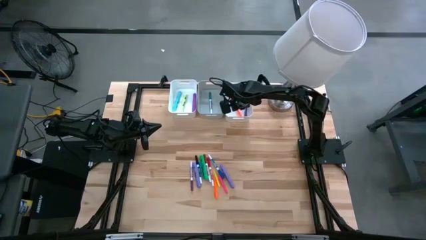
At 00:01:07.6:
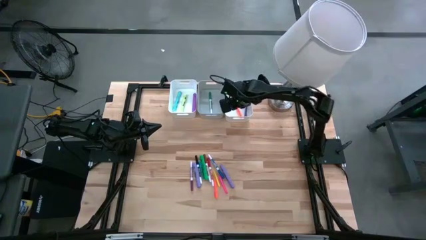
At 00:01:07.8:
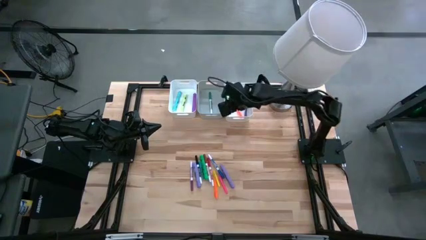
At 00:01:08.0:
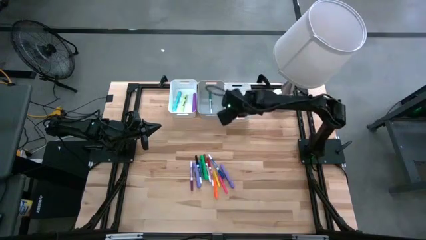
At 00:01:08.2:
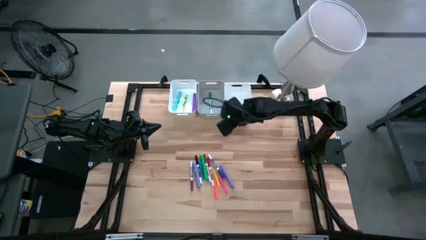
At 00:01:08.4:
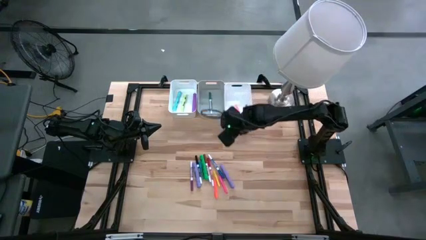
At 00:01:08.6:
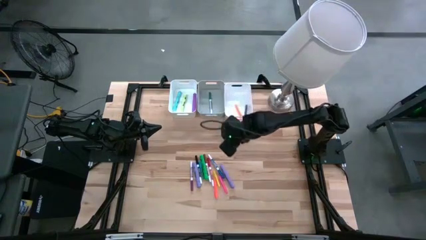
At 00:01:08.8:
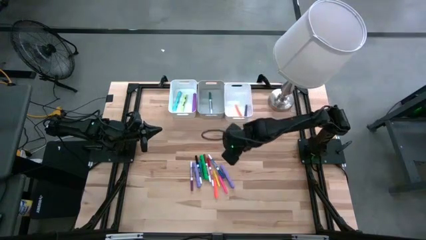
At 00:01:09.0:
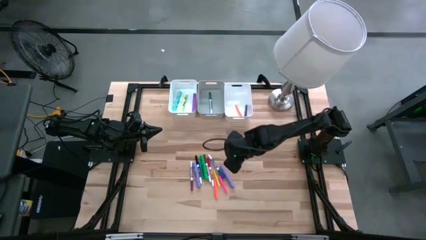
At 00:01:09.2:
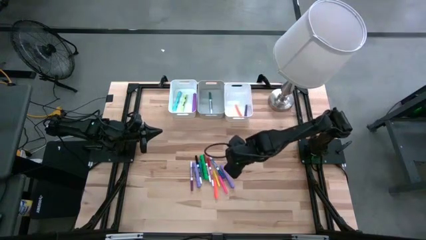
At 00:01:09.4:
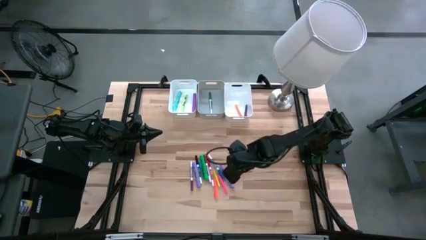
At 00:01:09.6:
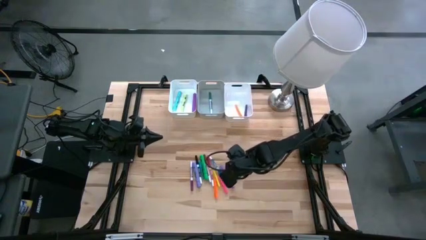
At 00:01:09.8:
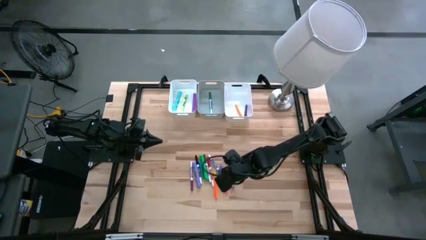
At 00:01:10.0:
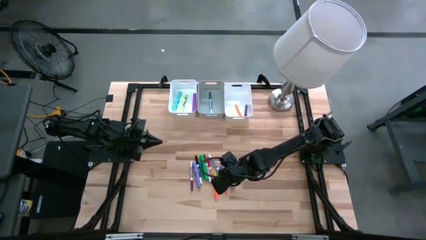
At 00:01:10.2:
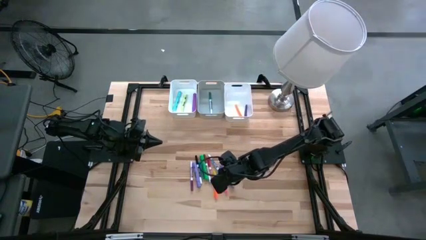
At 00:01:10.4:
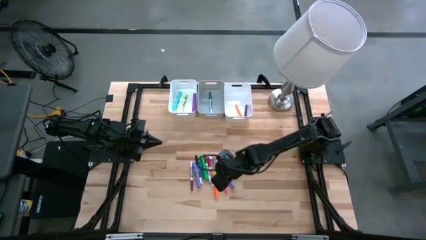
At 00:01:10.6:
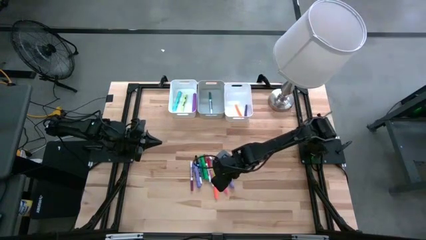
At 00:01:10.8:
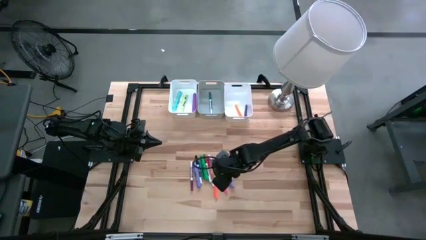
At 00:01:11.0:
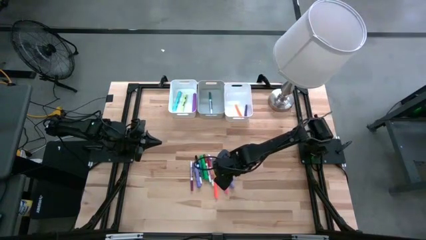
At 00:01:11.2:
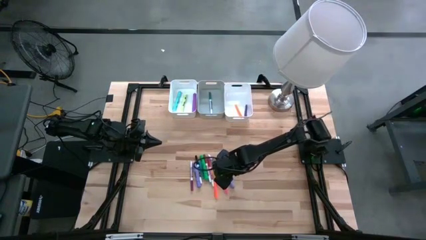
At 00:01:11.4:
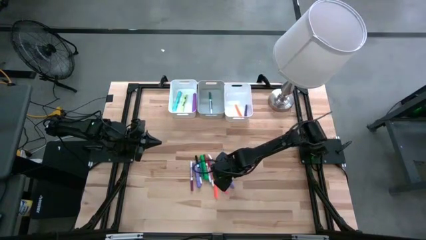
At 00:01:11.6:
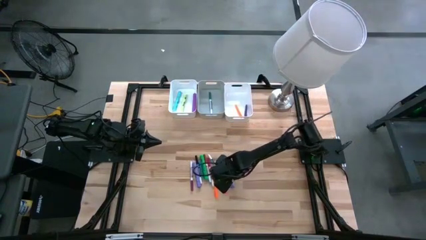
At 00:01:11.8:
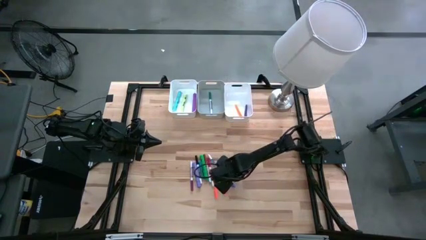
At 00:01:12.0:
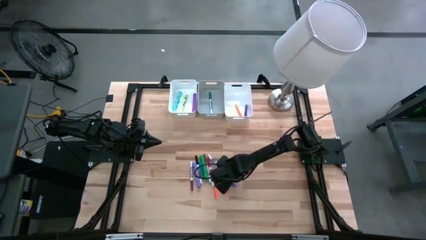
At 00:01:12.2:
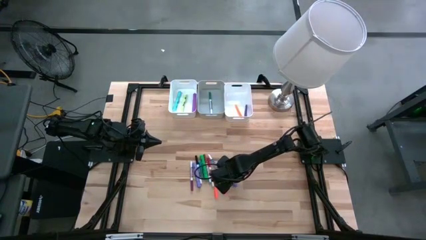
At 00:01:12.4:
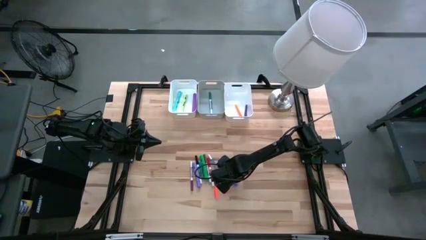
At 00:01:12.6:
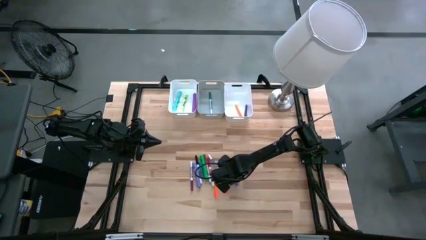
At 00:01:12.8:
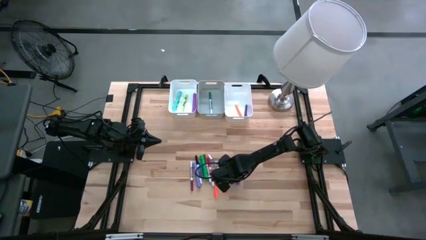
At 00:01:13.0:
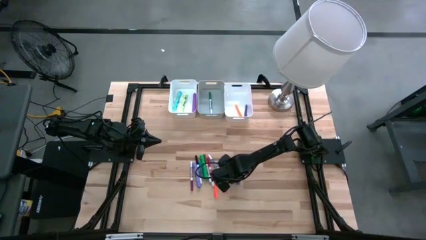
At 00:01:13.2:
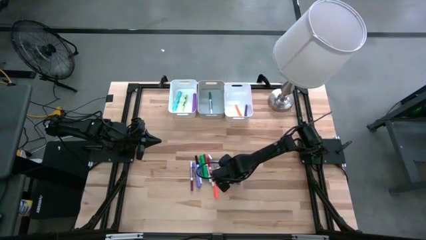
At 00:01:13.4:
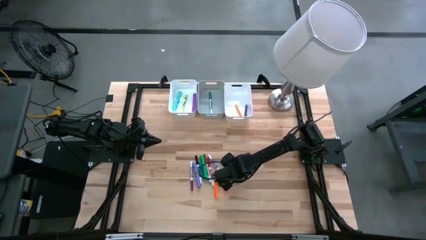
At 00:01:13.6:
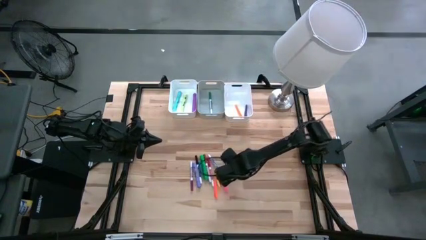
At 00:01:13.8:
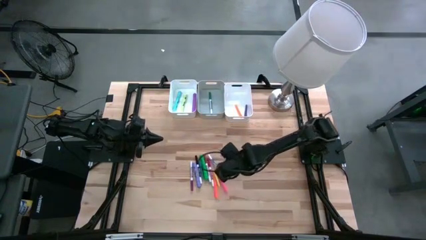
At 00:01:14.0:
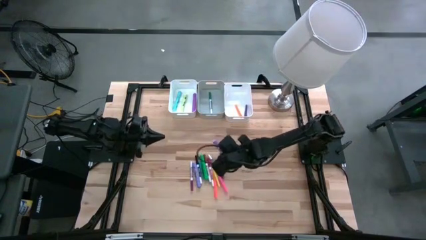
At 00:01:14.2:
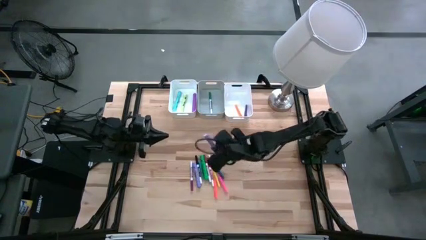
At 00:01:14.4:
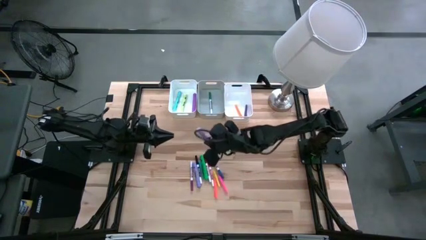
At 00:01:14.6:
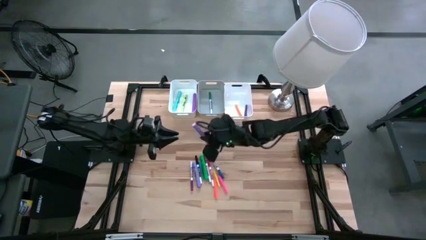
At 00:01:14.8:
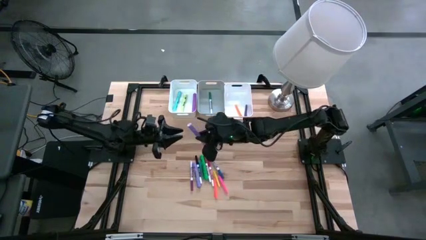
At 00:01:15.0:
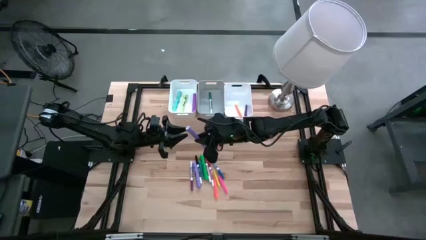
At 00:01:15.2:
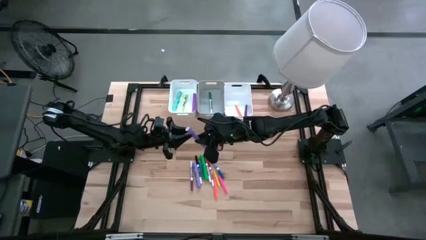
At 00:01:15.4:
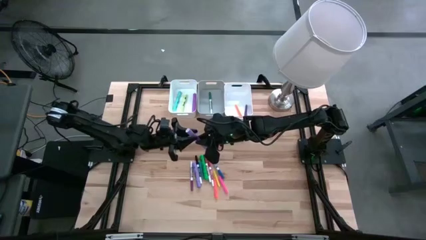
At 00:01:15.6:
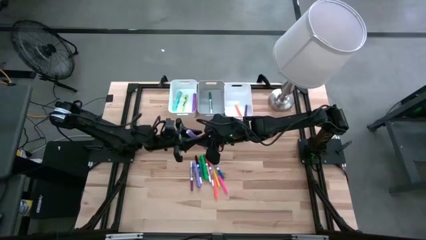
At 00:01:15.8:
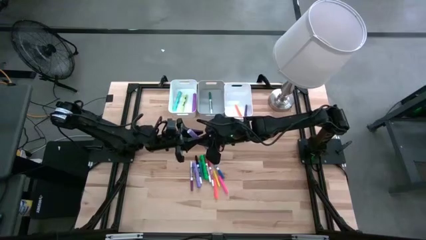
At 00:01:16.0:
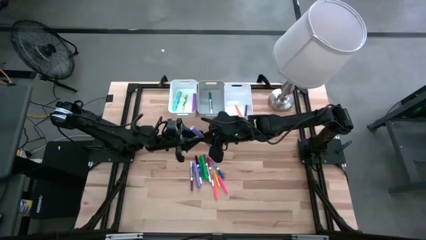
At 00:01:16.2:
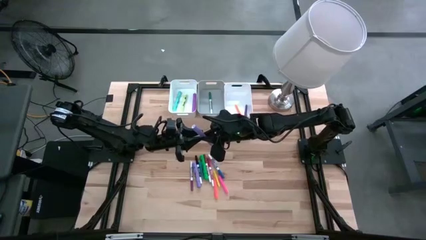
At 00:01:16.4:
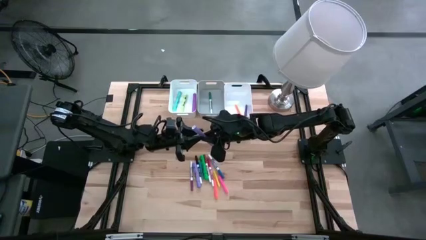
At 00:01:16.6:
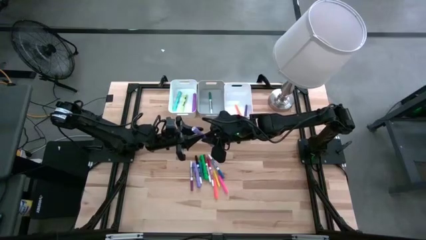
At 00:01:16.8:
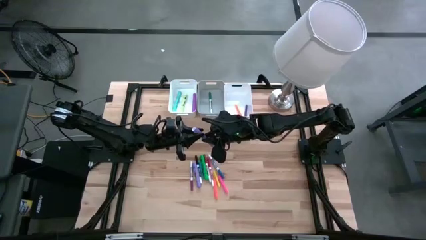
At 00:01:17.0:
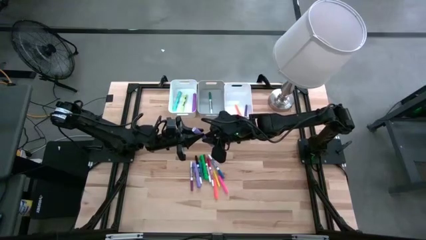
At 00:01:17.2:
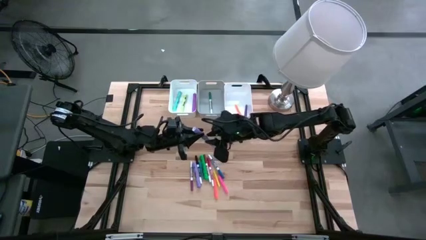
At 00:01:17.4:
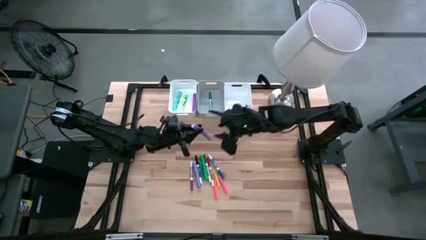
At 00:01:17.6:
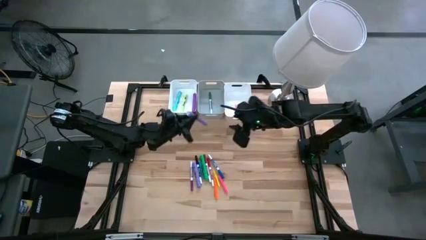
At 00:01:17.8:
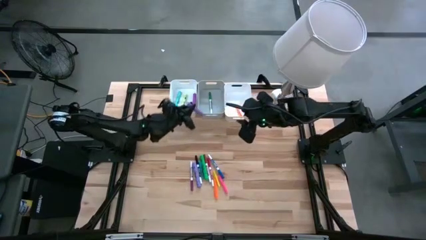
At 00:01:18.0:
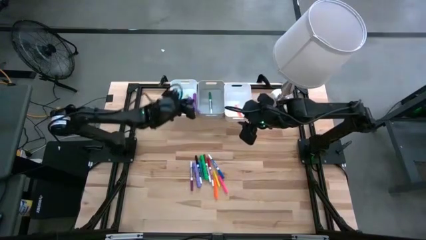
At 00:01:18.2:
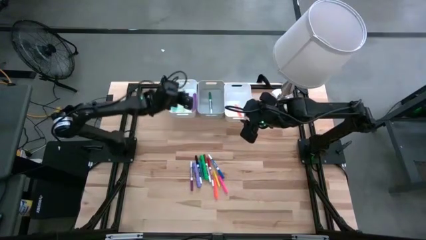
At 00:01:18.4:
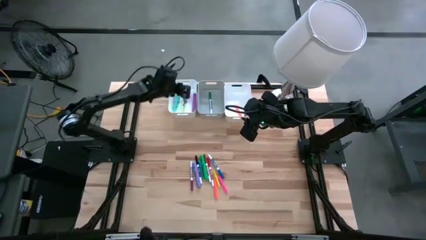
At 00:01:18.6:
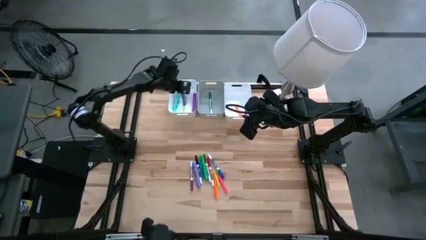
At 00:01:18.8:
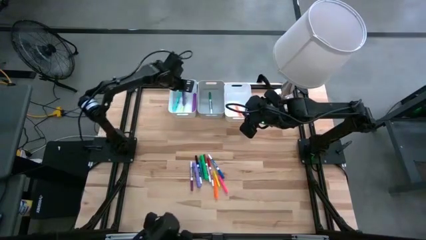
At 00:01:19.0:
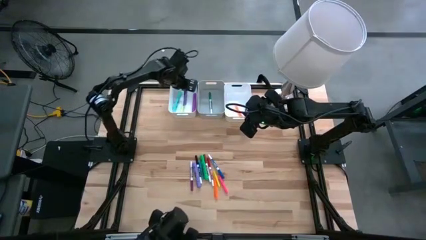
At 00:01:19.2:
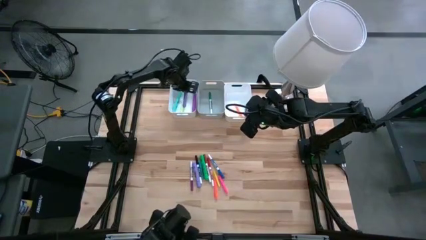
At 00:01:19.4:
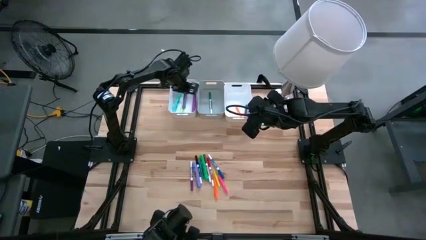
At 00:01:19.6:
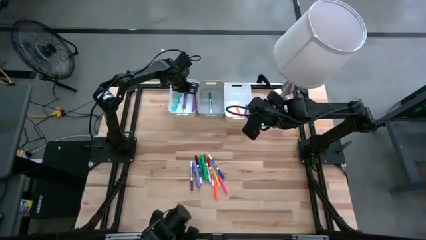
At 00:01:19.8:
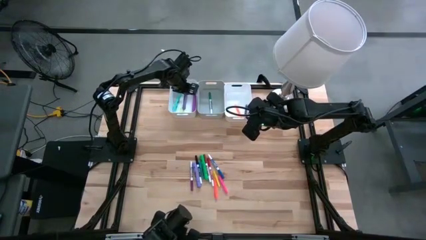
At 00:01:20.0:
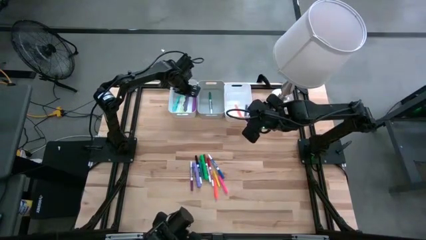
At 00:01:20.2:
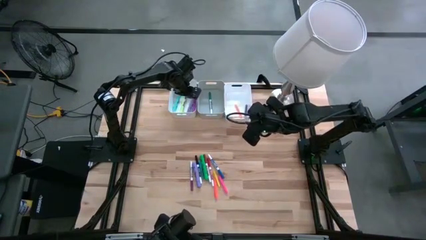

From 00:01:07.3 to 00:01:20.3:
Task: Pick & Place Markers
Put the right purple highlighter pen into the left white bin

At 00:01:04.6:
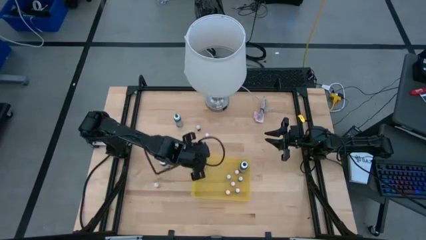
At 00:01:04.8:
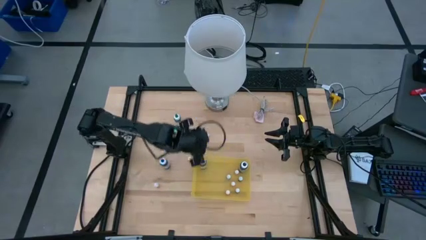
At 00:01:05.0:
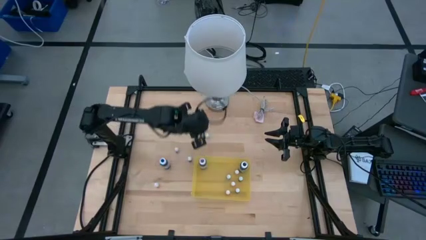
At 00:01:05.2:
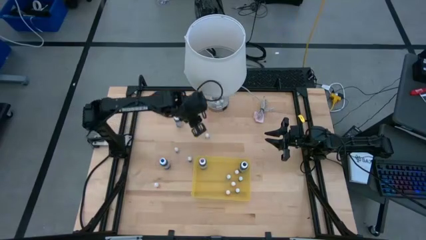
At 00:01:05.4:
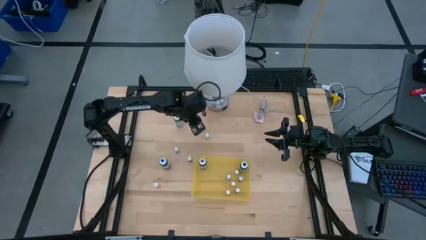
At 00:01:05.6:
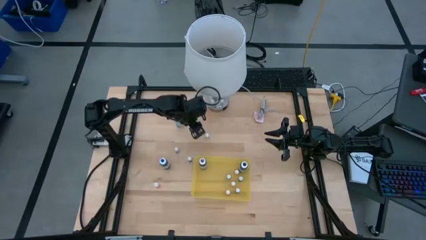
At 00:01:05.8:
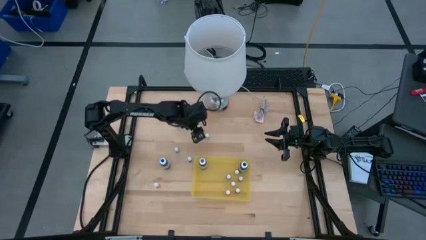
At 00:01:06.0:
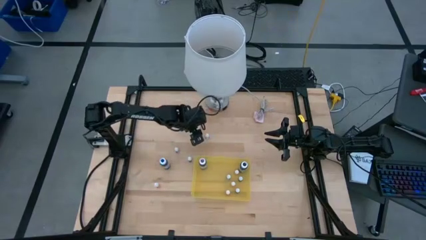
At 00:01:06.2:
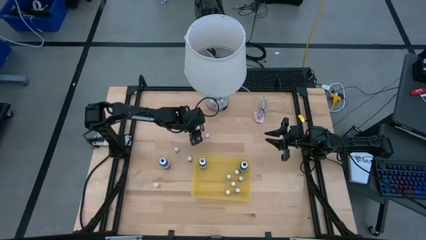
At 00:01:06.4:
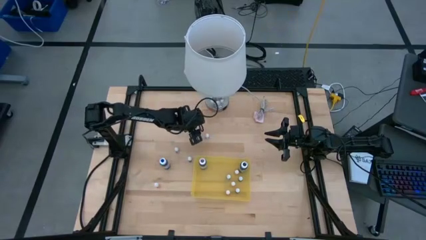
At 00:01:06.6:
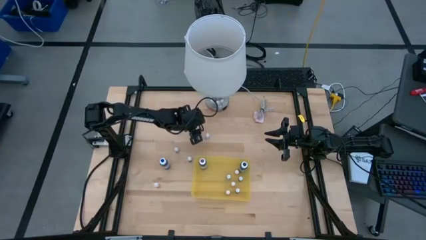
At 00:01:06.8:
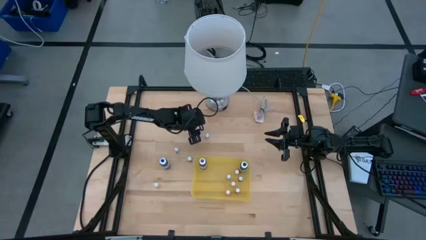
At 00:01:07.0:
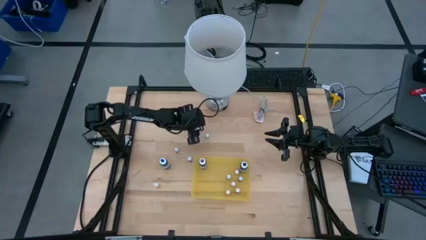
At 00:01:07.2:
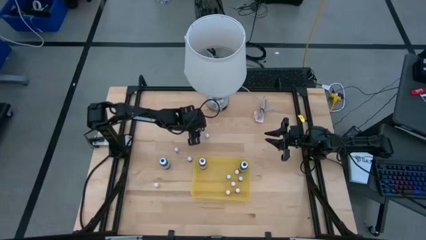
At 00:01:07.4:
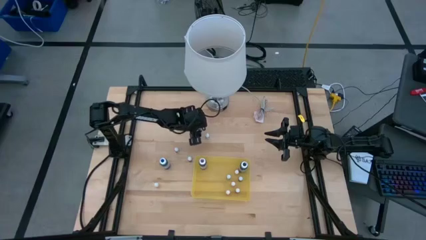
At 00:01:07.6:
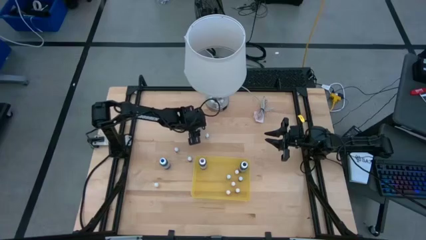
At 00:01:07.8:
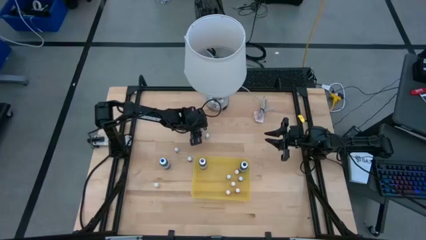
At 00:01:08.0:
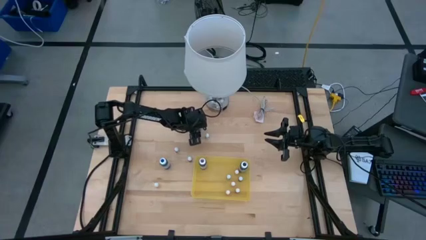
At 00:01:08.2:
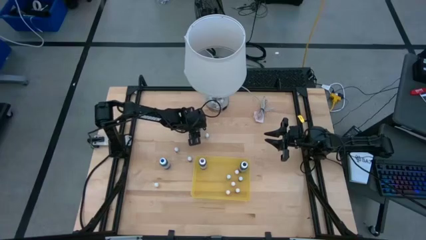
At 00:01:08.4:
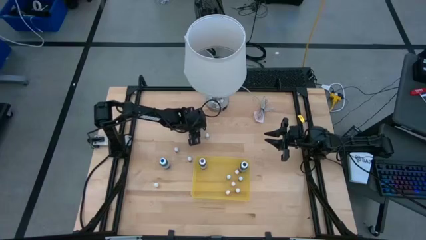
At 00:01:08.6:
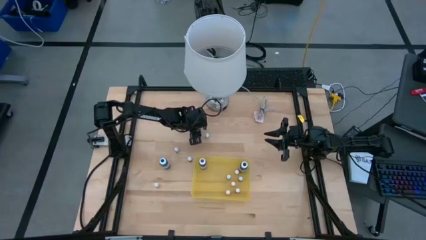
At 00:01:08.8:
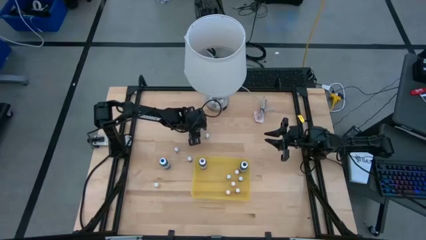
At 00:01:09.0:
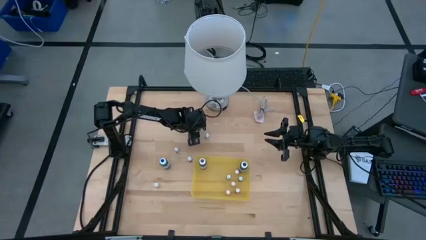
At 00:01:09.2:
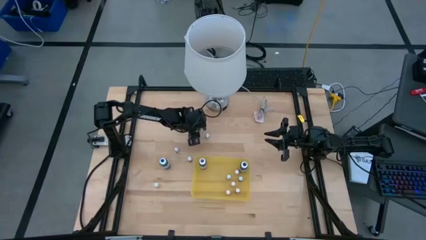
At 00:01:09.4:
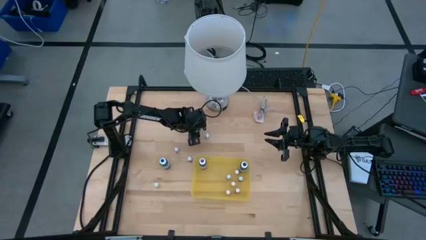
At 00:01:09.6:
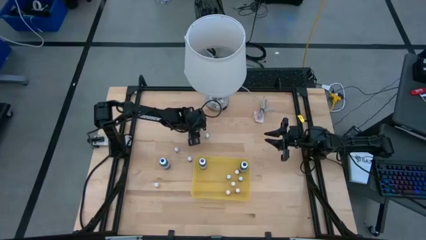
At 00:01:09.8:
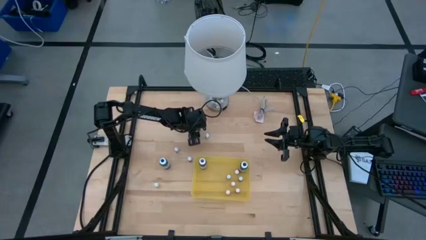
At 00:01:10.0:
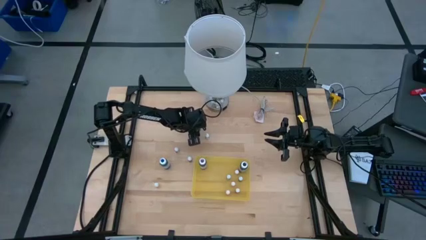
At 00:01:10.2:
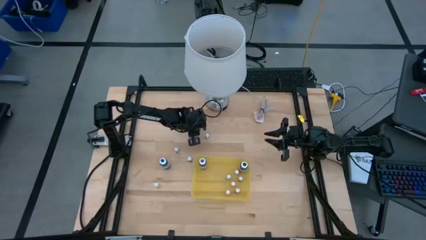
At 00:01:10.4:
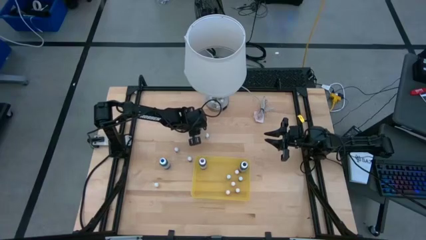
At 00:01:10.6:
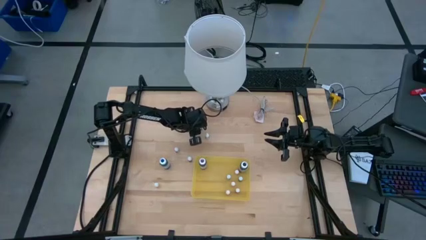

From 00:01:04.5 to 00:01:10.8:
Task: Pick & Place food coloring
Put the small blue food coloring bottle into the transparent bin
